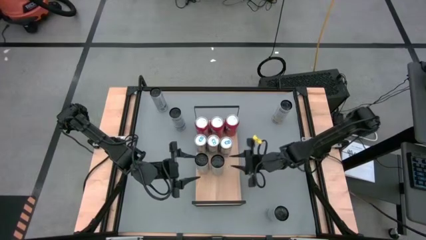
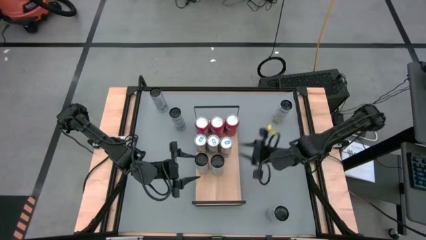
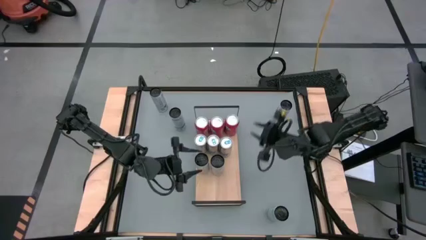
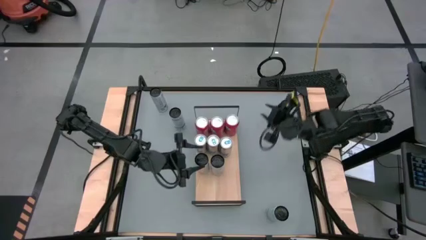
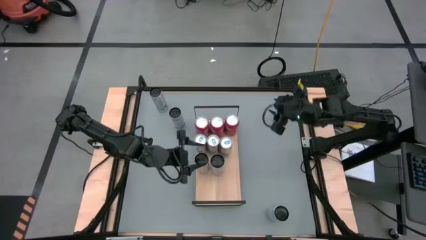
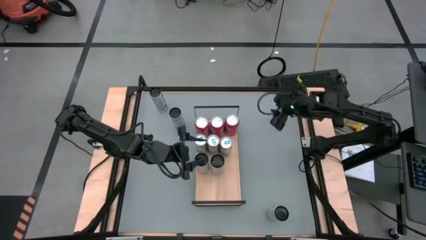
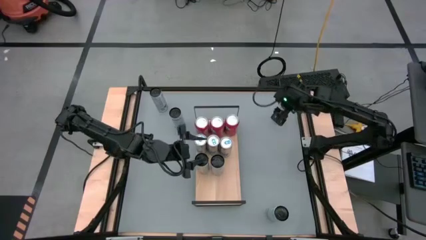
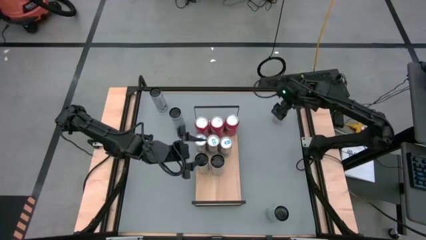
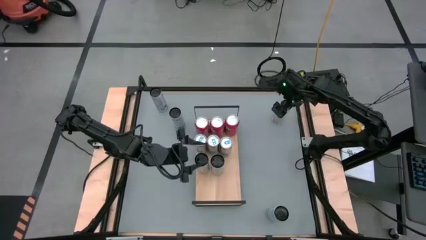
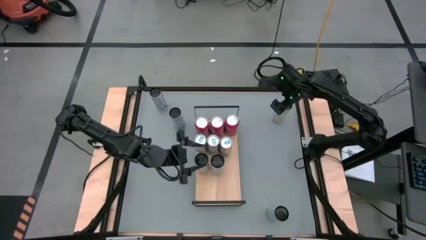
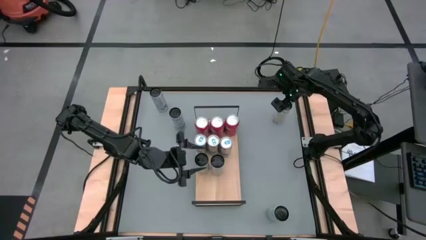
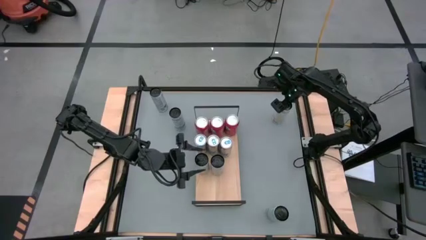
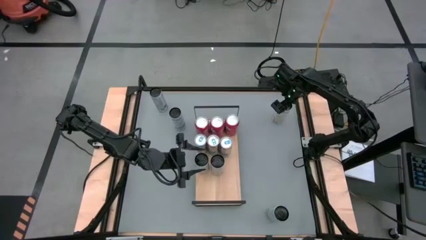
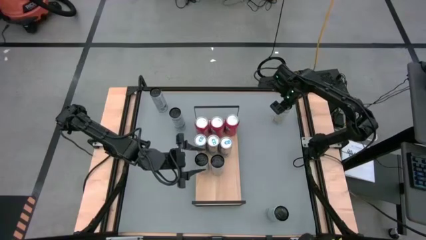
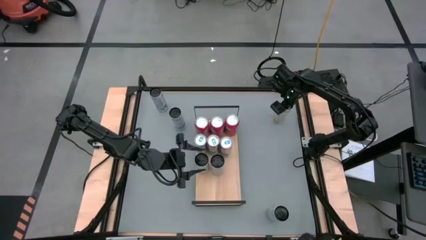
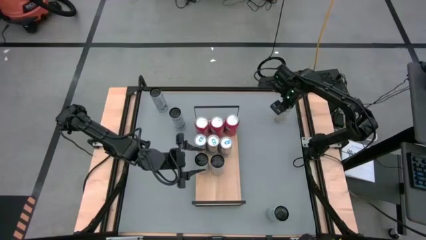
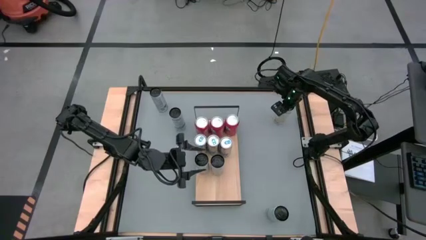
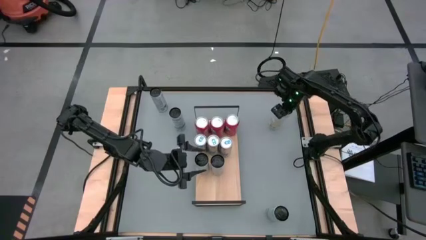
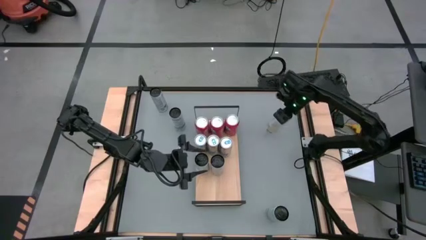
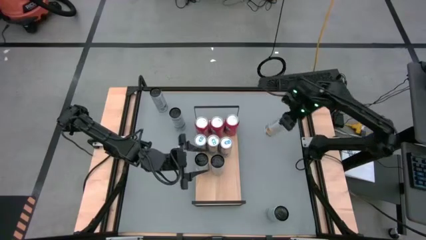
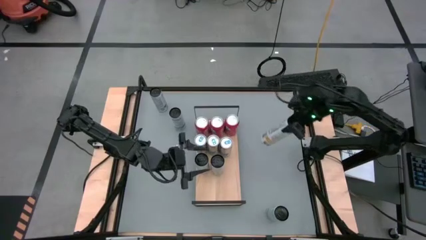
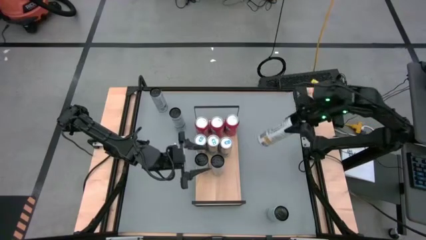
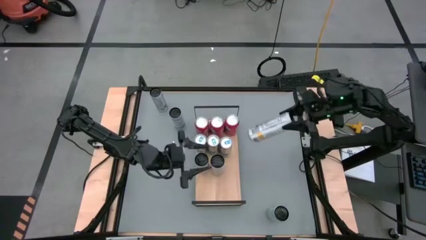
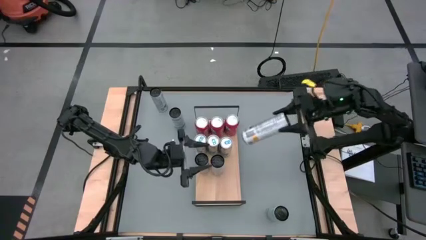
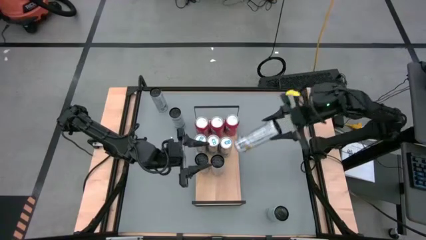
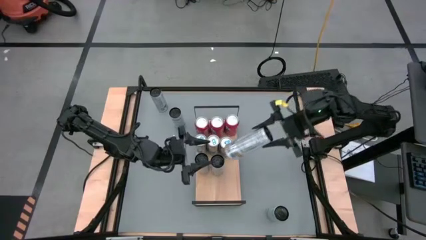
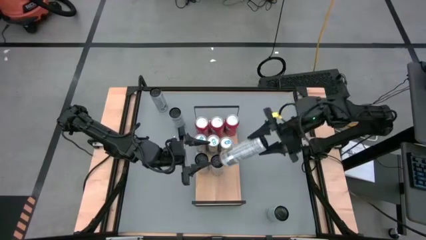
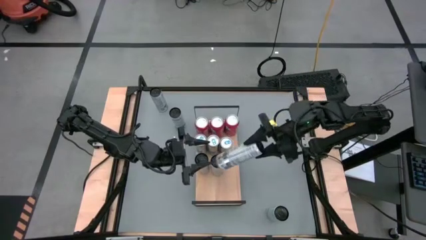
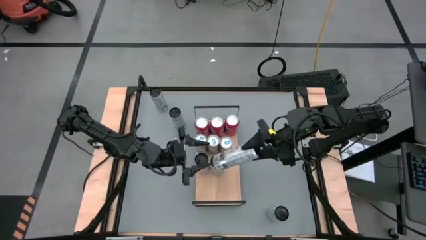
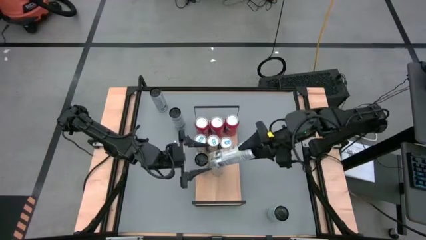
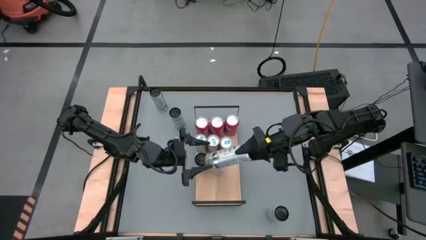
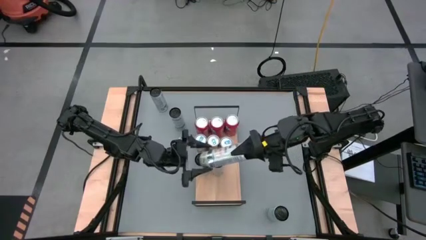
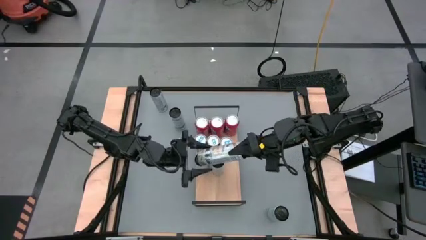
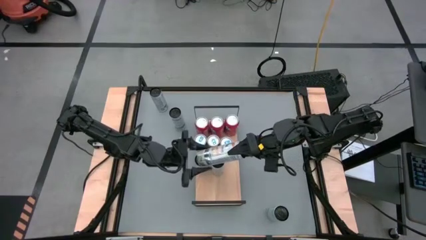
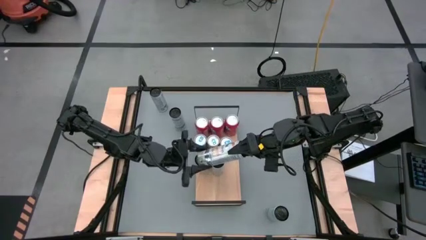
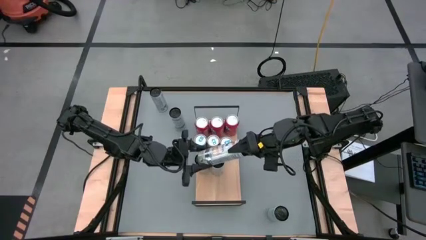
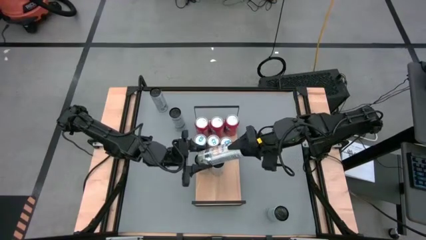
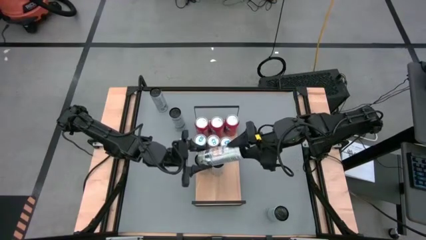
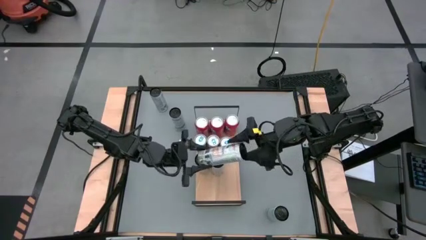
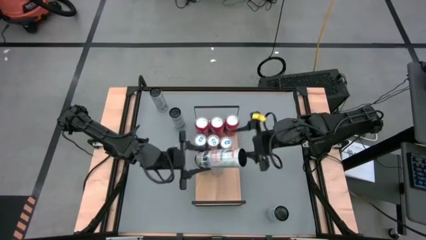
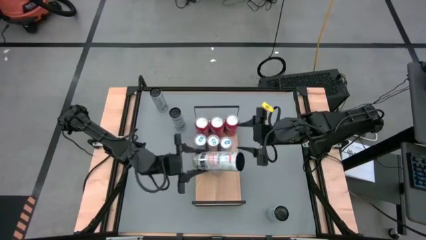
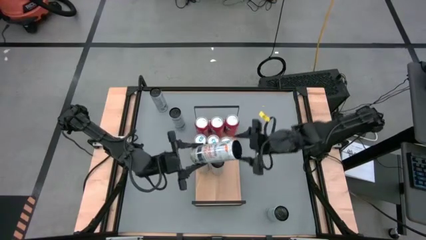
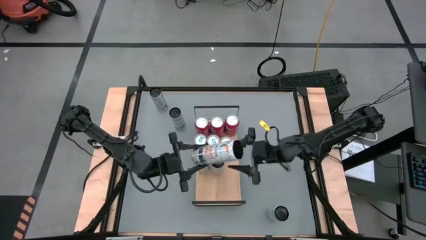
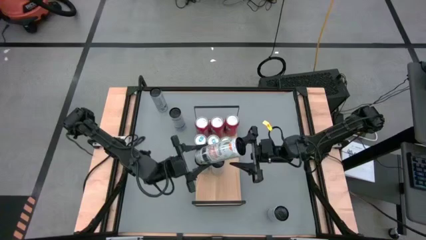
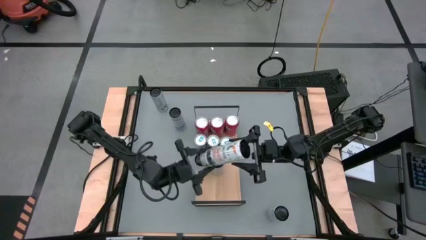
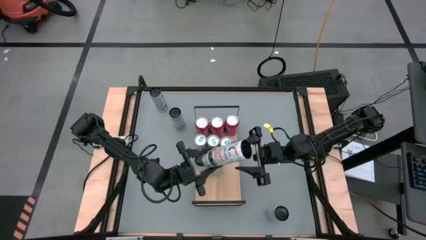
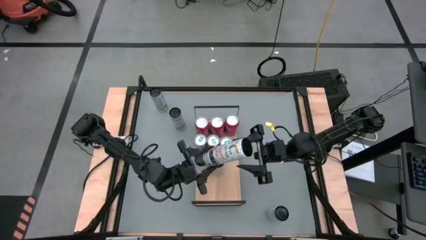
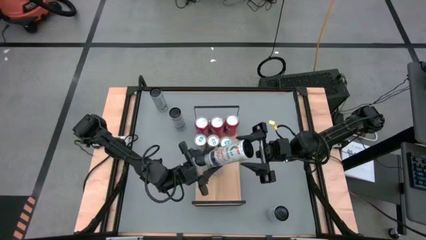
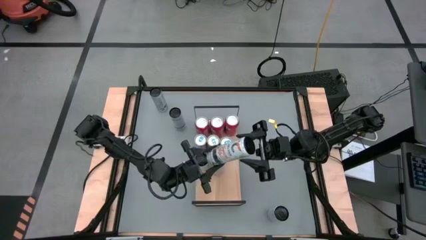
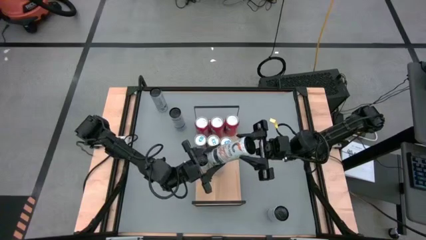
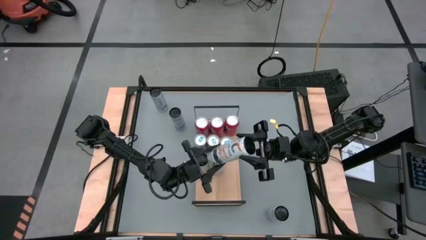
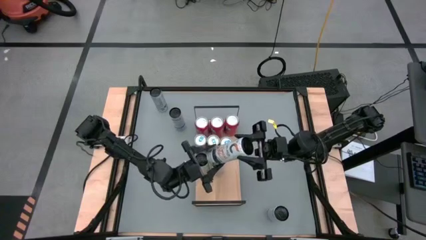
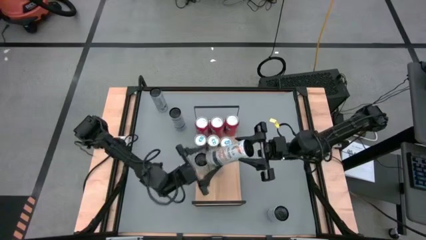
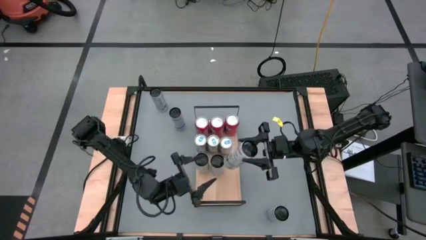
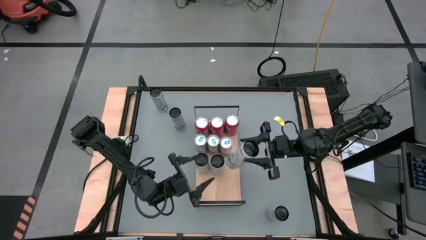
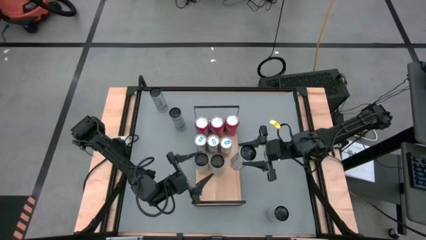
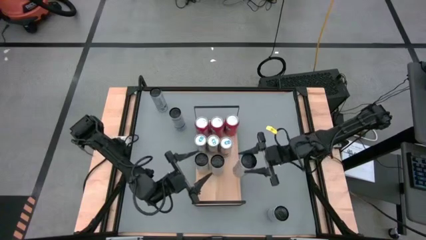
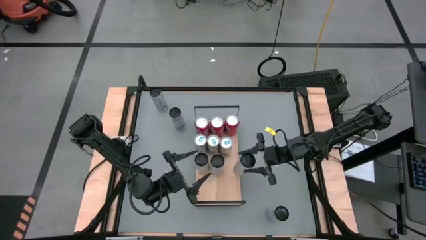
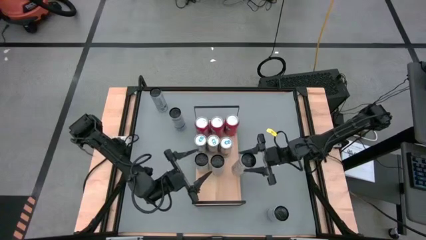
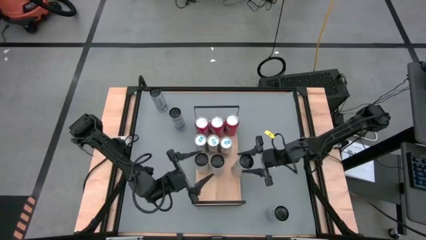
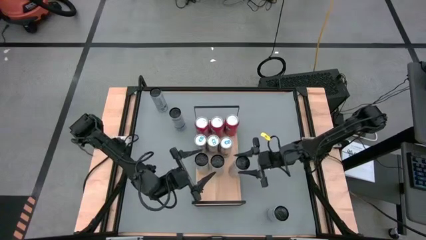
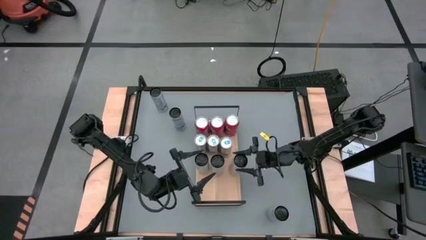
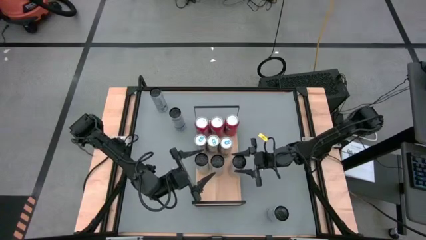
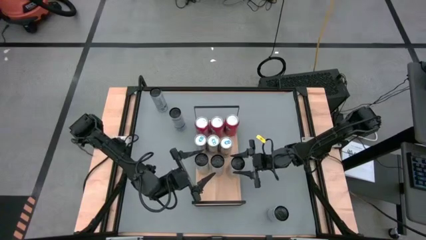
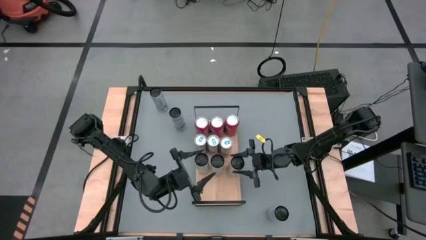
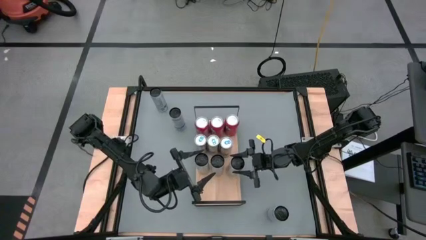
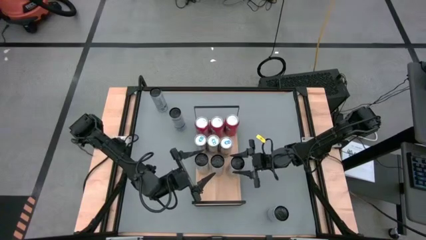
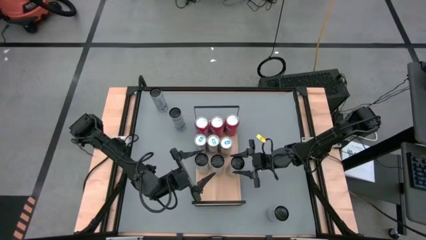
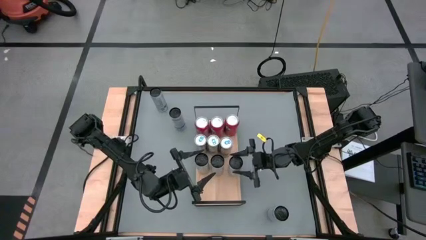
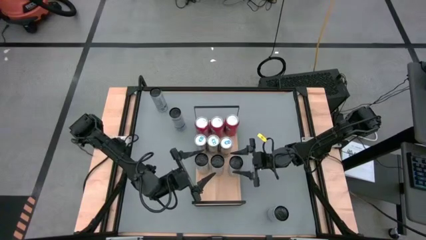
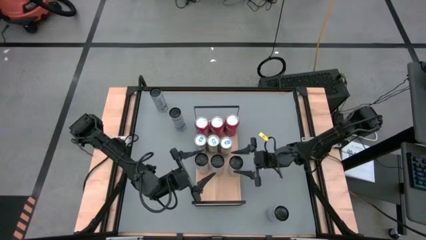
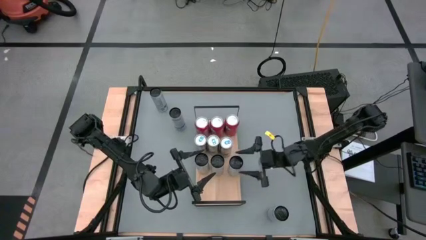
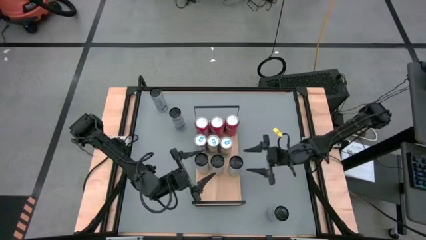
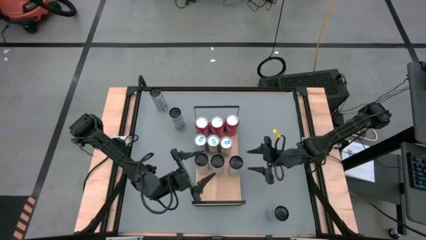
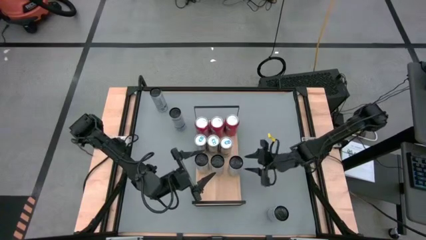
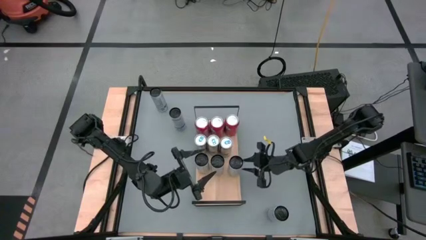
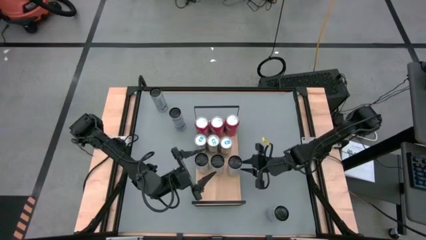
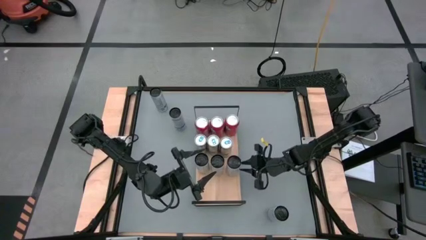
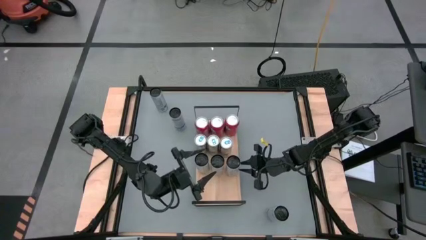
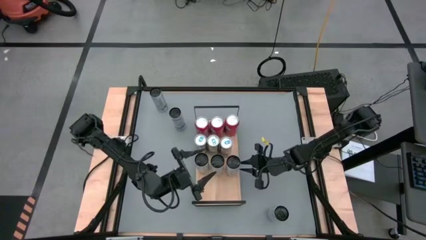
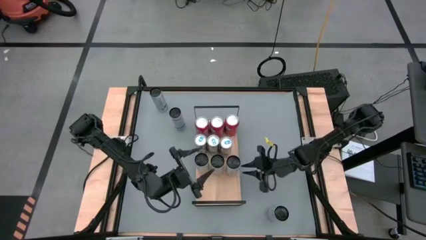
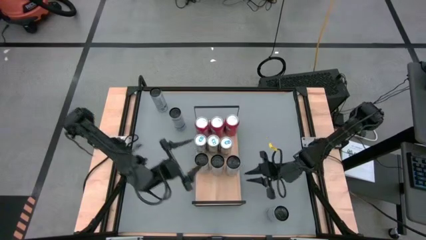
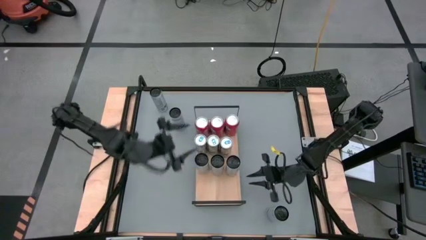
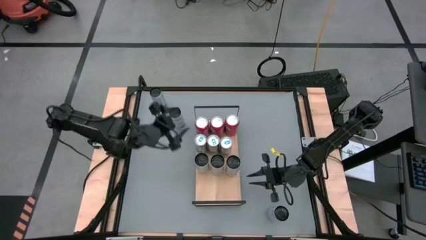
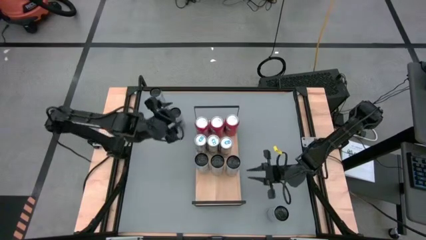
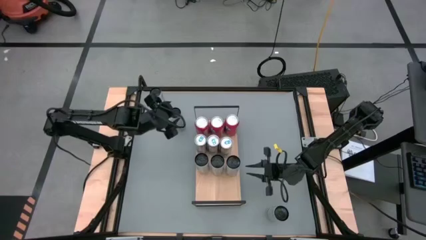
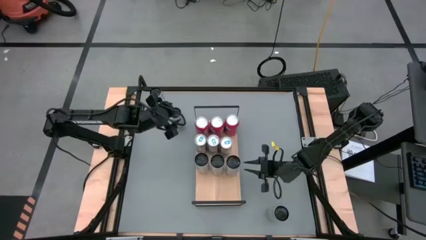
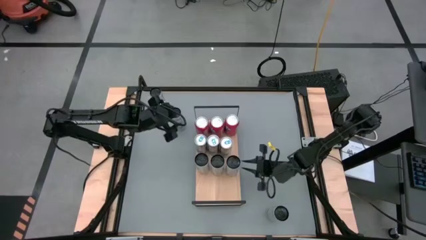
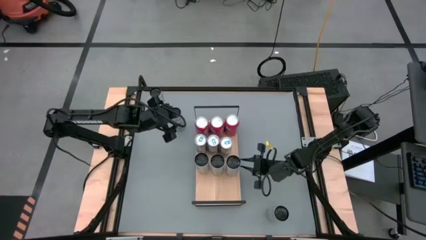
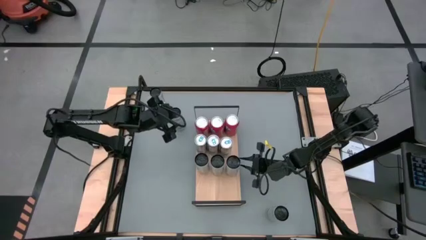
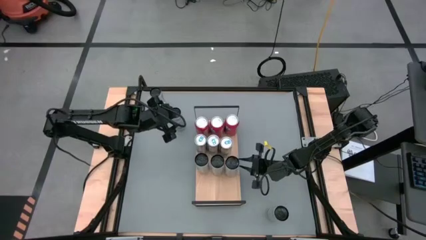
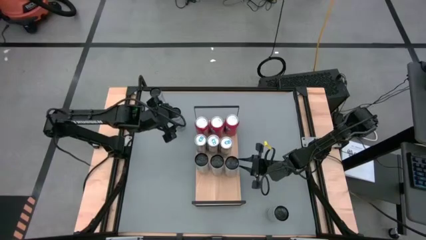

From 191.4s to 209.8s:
Task: Place canned beverage on shelf
Put the white-yellow soda can aligned with the other white-yellow soda cans on the shelf
